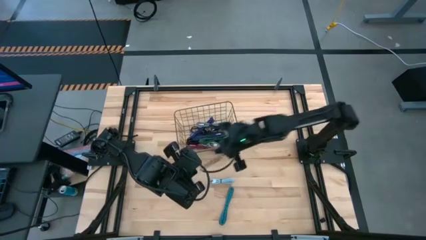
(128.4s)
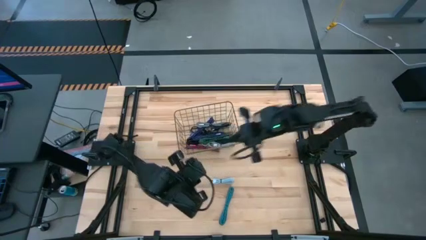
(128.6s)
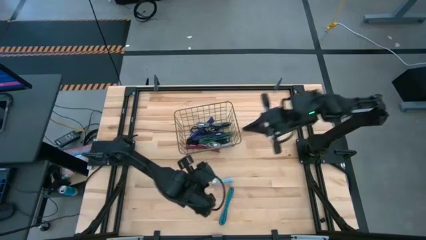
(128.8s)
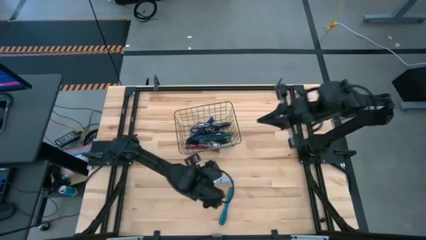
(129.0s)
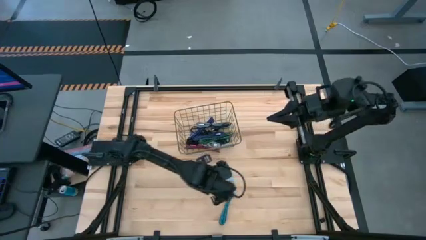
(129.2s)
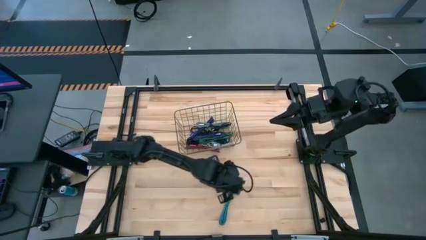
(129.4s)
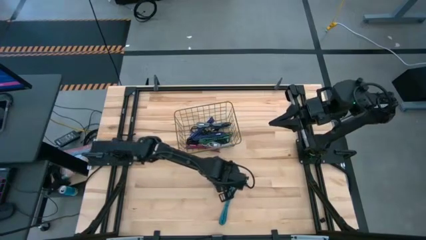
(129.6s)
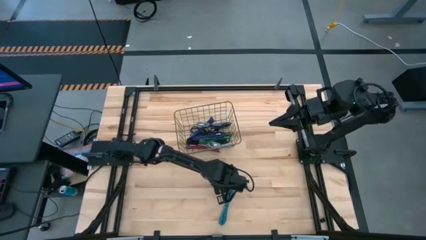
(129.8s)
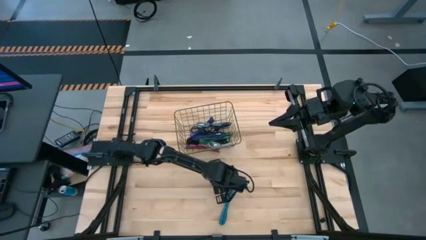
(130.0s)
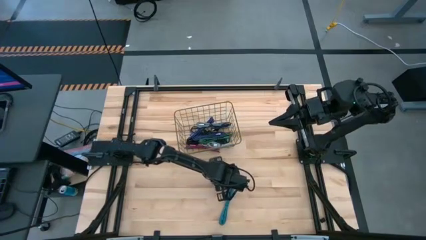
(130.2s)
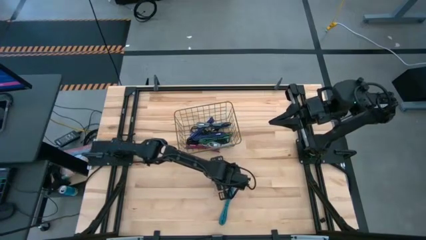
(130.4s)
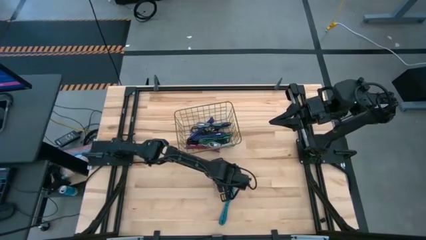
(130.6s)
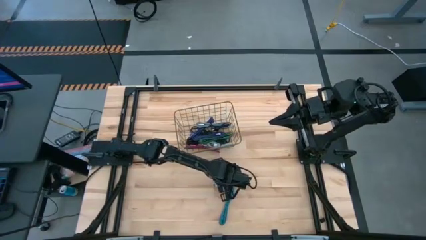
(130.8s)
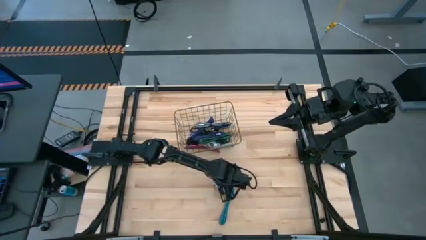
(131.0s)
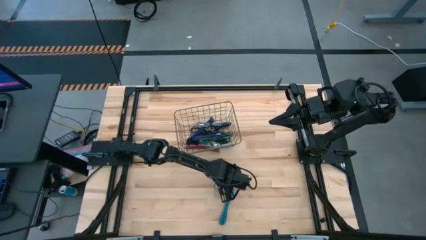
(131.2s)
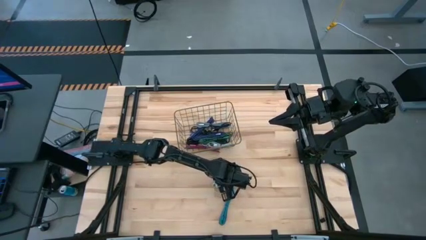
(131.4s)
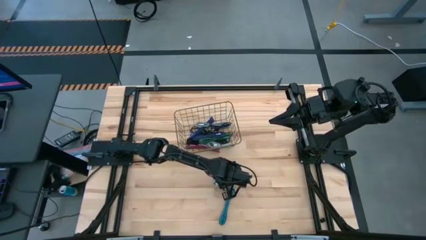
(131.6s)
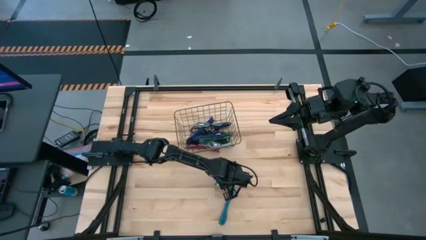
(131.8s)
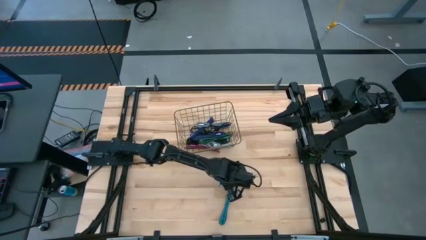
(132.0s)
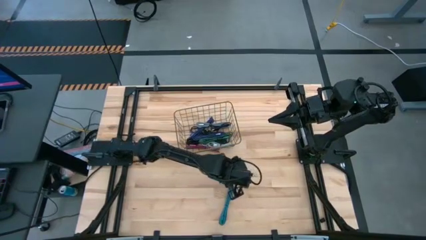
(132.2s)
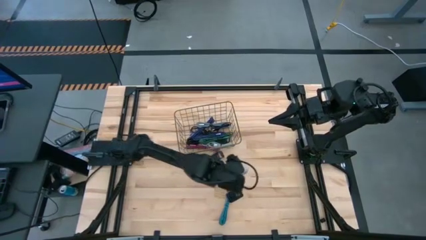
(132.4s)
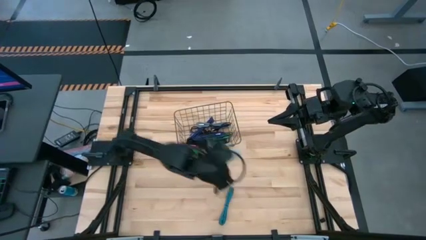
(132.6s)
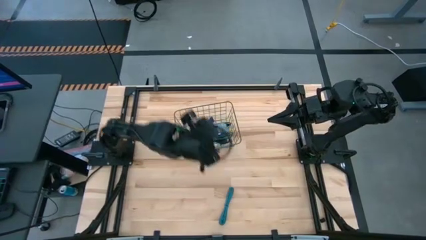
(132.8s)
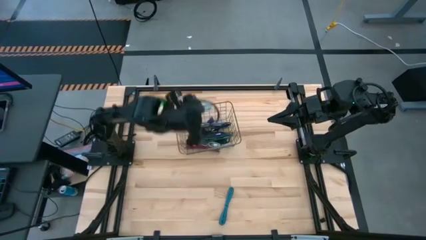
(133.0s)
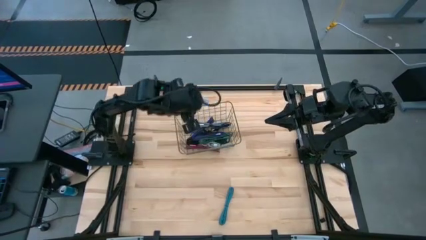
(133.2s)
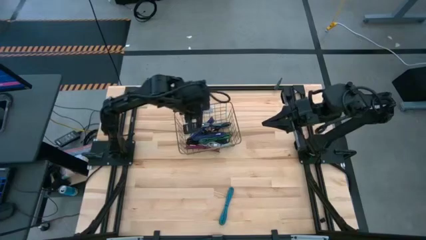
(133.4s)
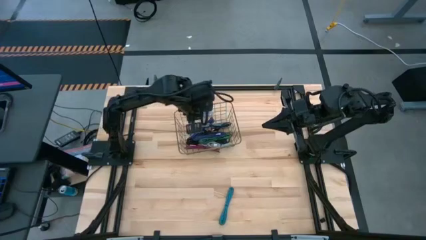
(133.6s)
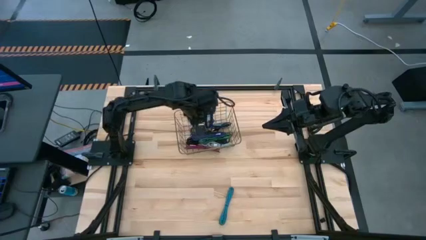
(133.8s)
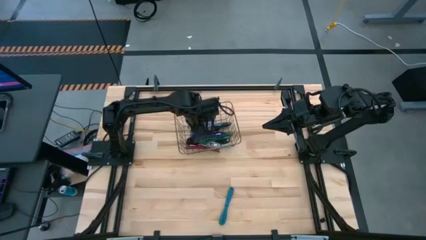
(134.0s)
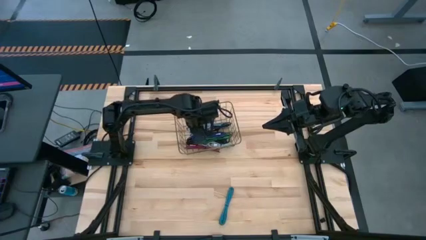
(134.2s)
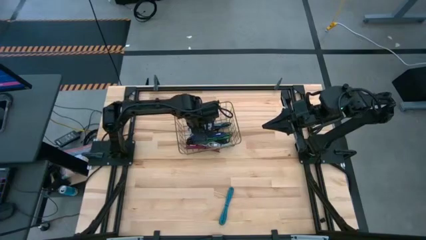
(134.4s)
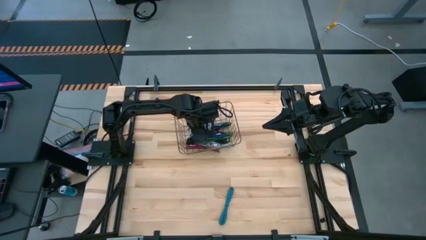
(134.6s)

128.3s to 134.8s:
Task: Pick and place USB-C Cables
Put the light blue charger cable into the gold wire basket

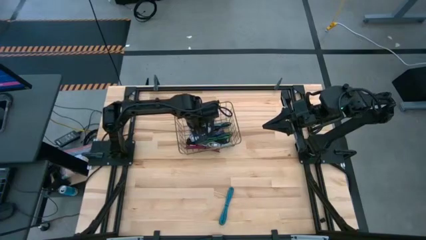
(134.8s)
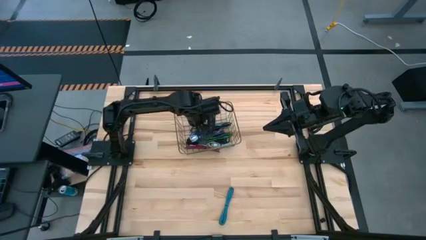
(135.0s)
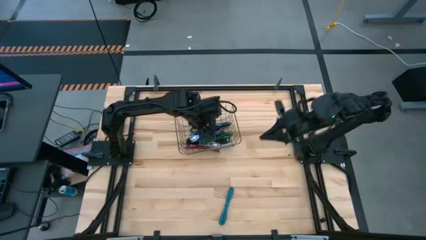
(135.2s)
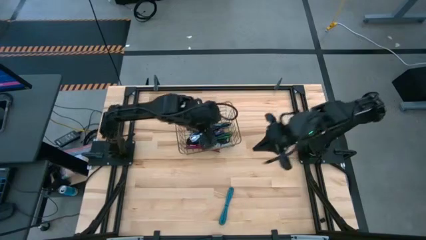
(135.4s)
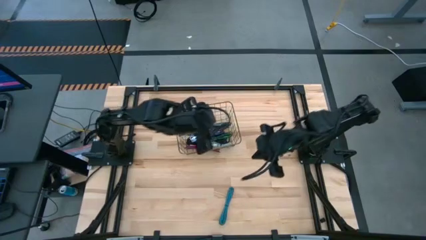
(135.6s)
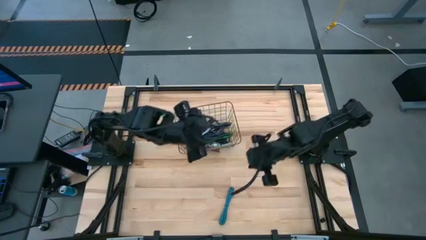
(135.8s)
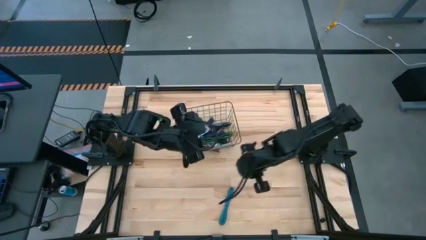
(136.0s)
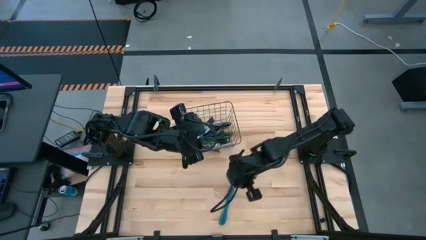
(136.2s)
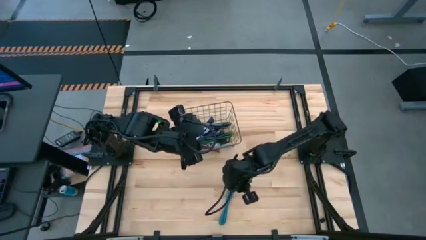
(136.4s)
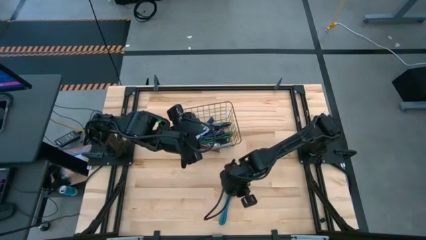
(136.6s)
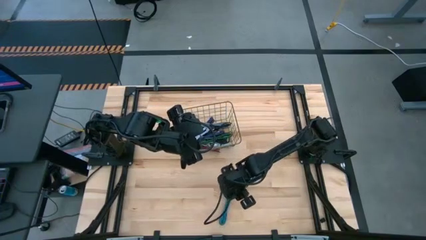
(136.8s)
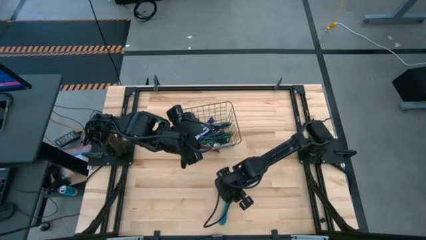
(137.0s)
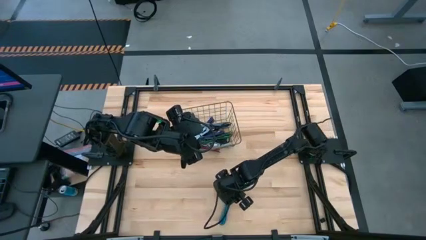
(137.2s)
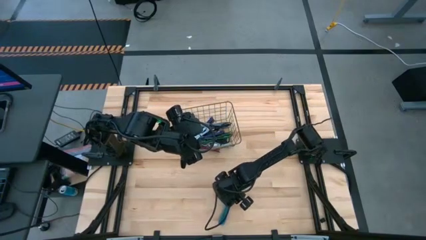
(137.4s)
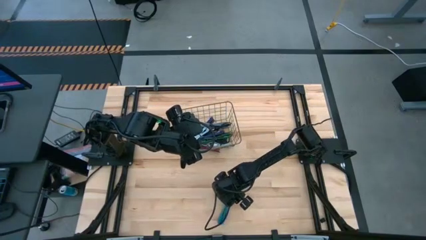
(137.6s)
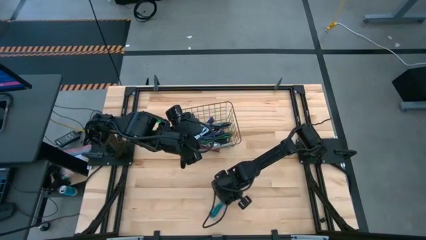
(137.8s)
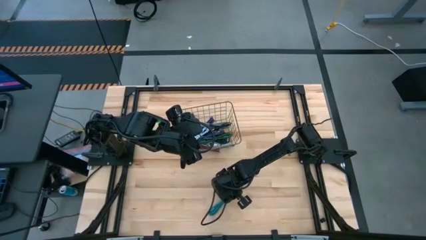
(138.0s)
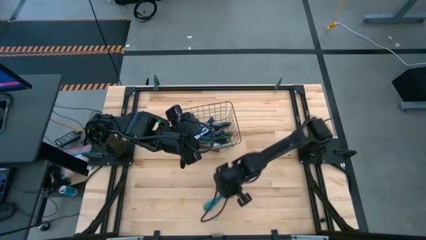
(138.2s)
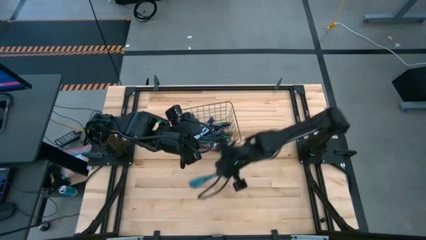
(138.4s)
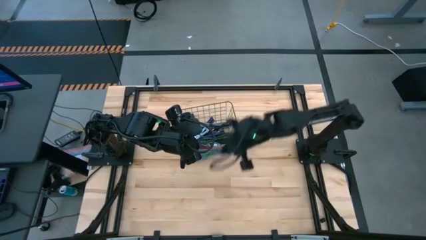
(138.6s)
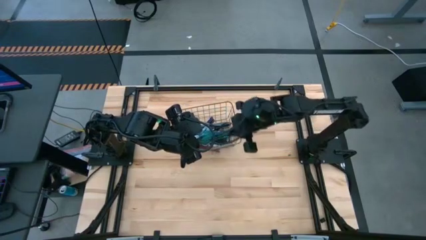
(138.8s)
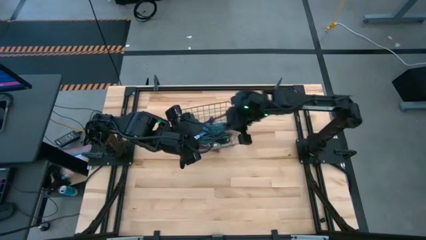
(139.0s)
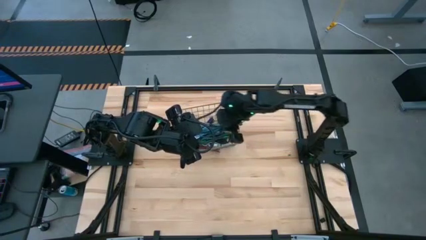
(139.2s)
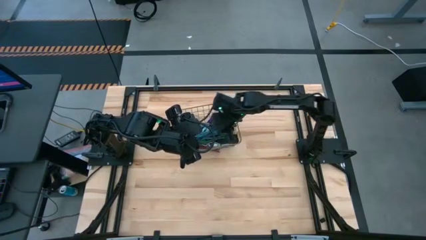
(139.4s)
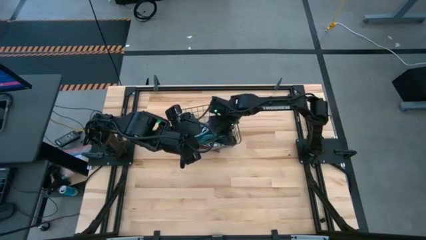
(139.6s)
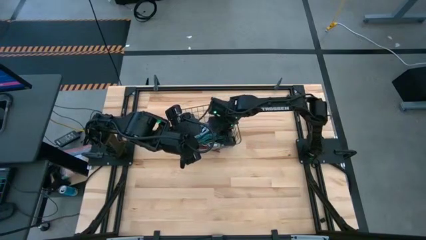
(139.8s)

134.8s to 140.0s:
Put the blue patterned charger cable into the gold wire basket

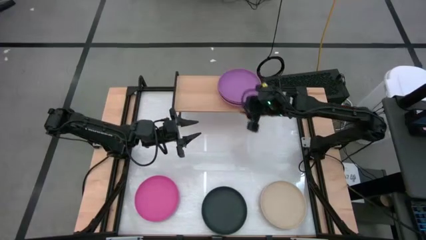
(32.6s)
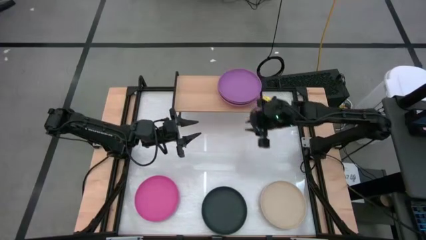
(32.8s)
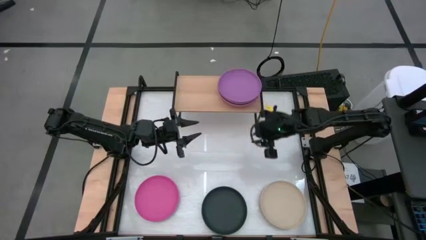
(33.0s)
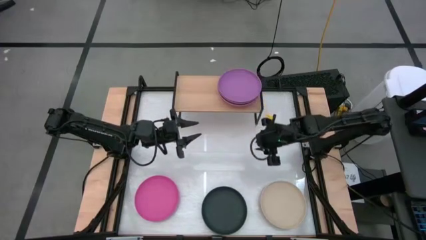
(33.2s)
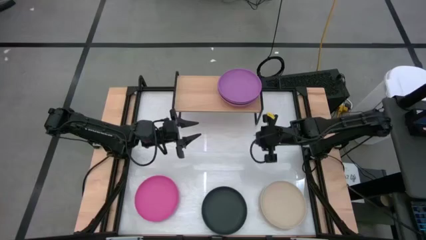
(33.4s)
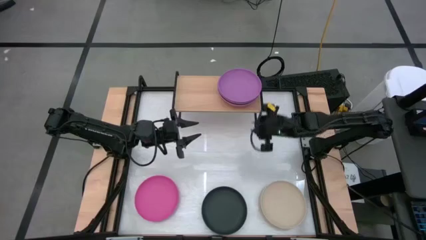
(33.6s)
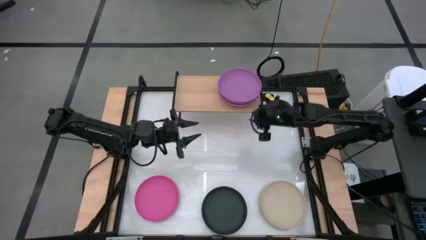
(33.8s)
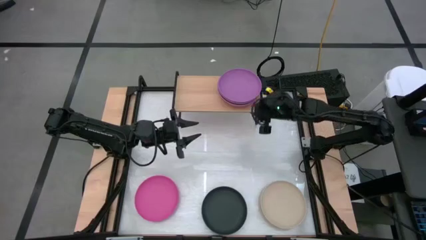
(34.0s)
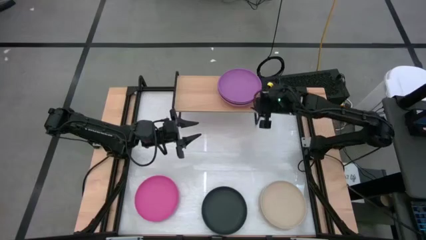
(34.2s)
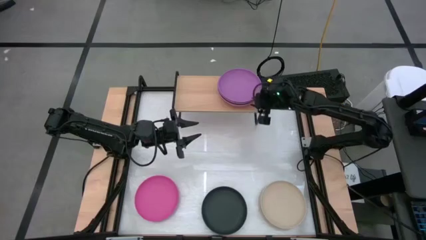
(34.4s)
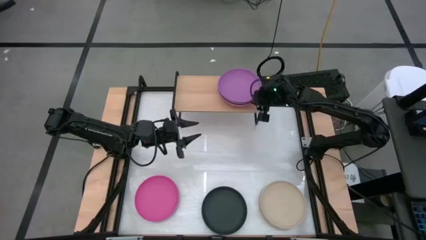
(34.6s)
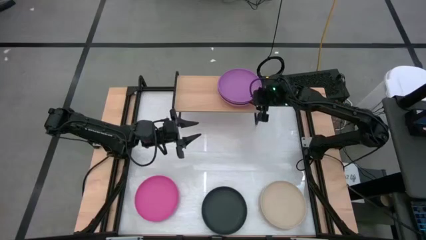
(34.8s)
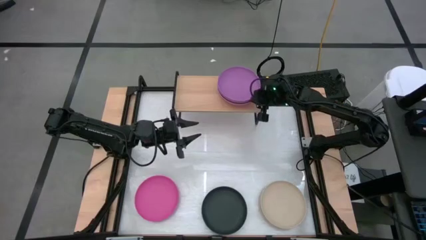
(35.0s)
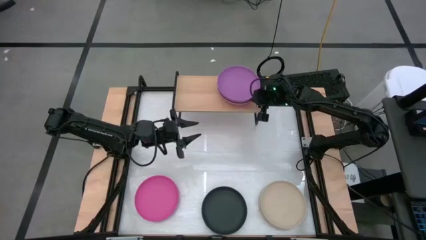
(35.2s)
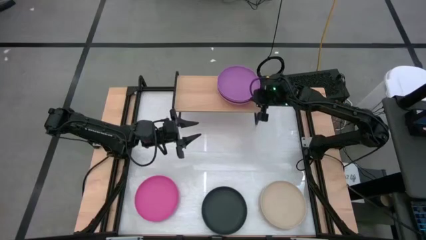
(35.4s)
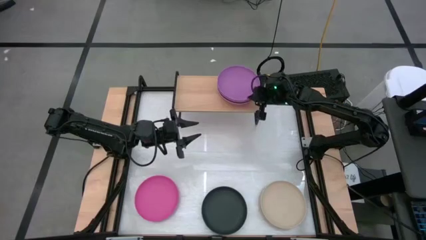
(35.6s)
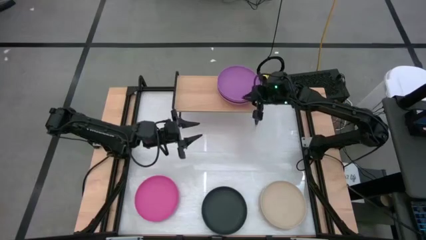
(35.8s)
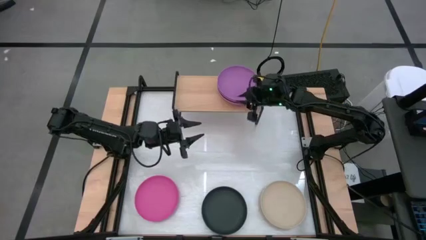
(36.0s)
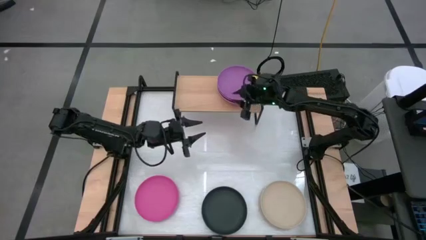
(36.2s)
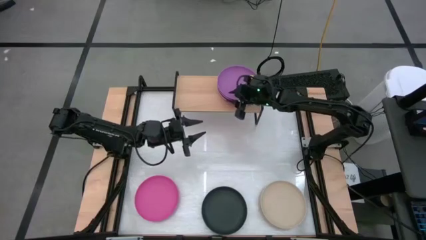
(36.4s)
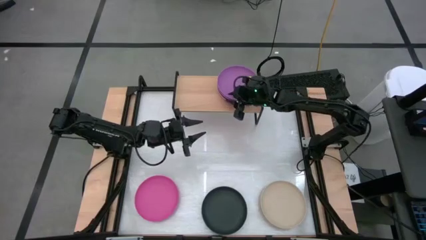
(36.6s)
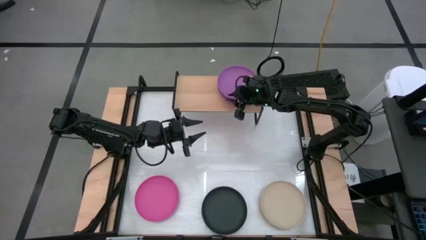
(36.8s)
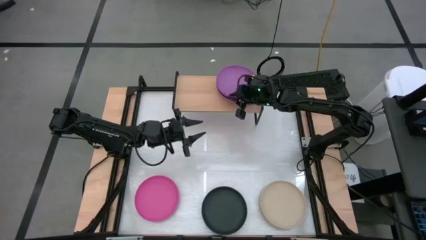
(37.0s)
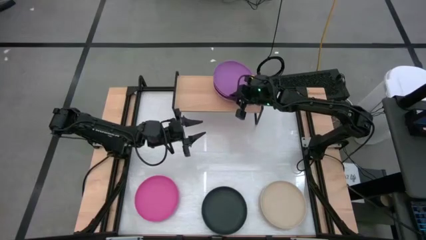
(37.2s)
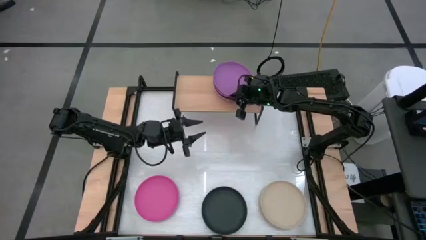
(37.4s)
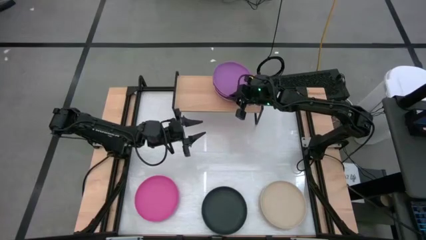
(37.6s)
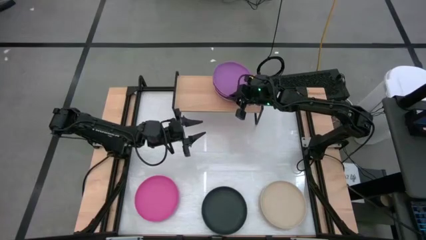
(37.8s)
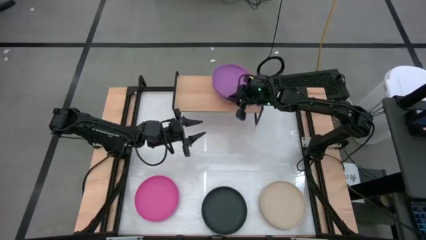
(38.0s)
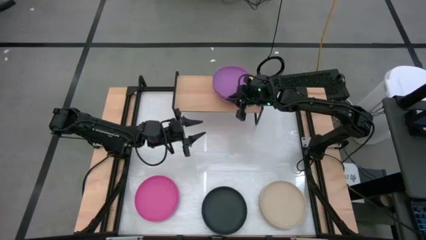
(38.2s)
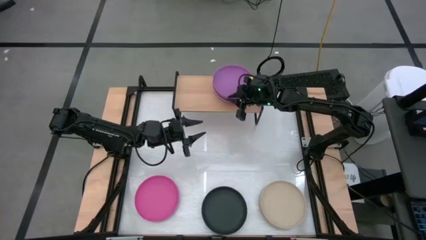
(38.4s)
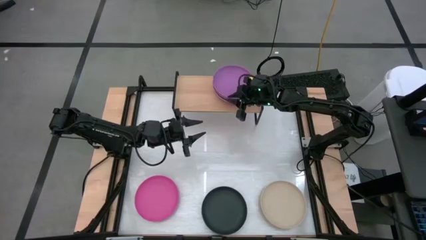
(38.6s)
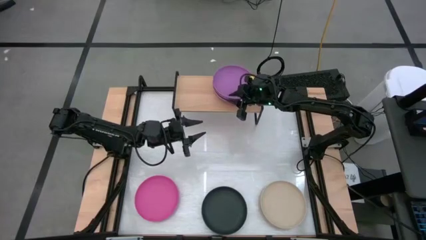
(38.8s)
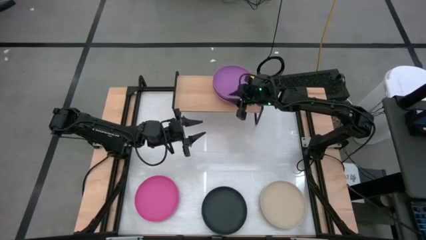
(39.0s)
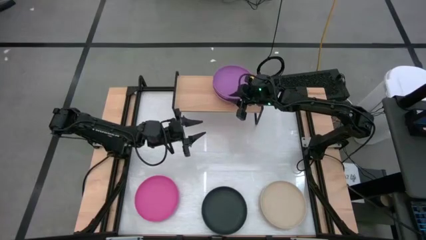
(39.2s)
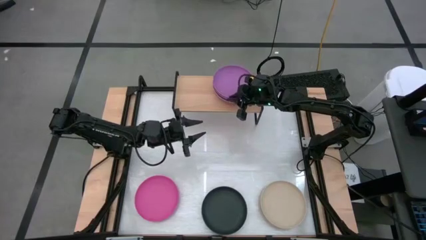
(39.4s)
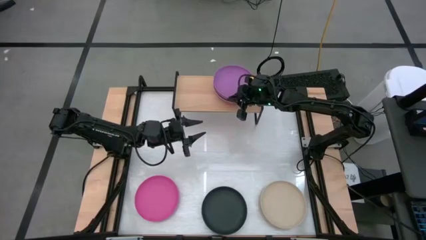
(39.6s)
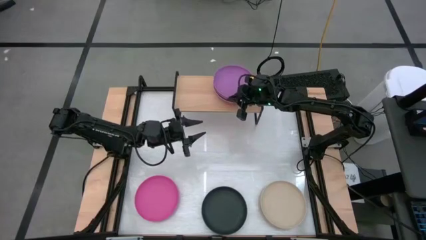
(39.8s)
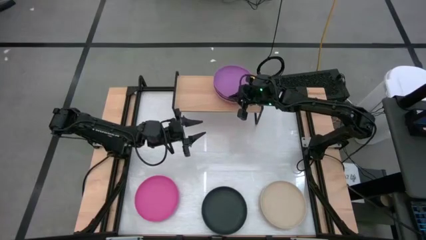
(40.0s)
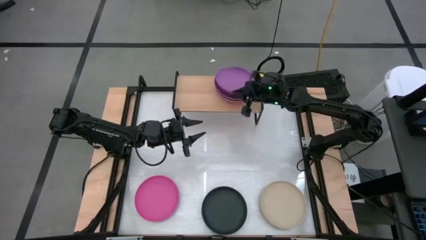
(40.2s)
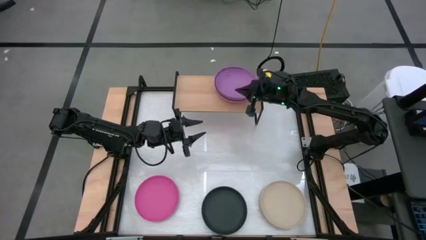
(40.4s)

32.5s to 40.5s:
Task: Place and stack plates onto a shelf
Adjust the stacked plates on the shelf
